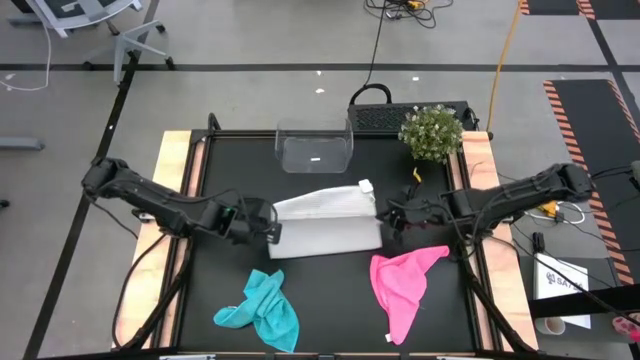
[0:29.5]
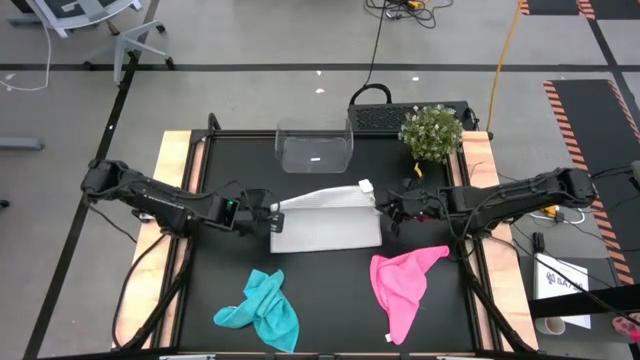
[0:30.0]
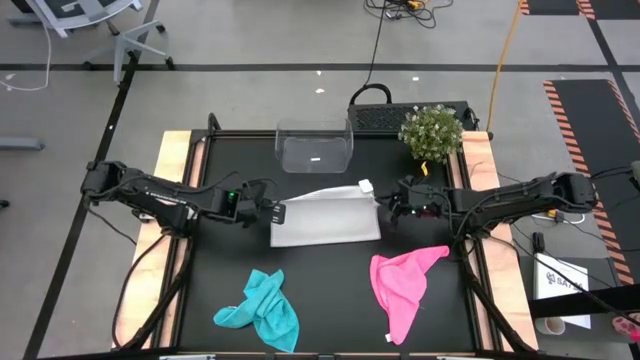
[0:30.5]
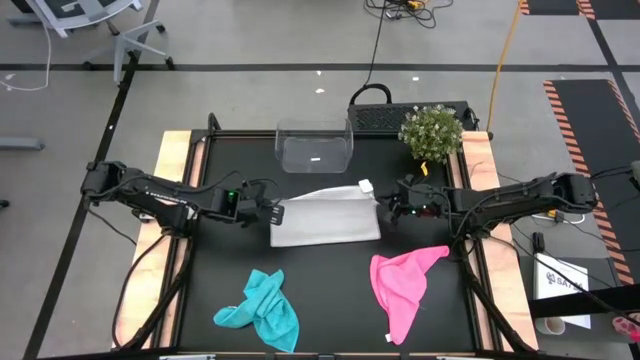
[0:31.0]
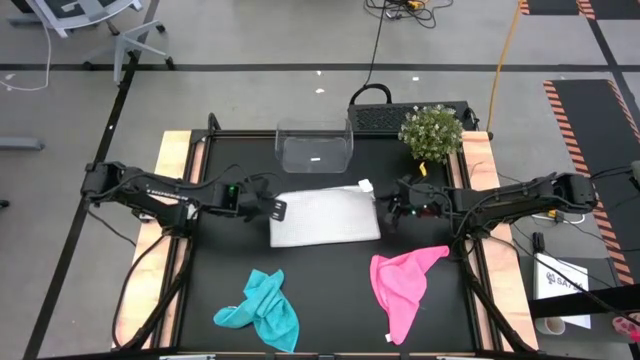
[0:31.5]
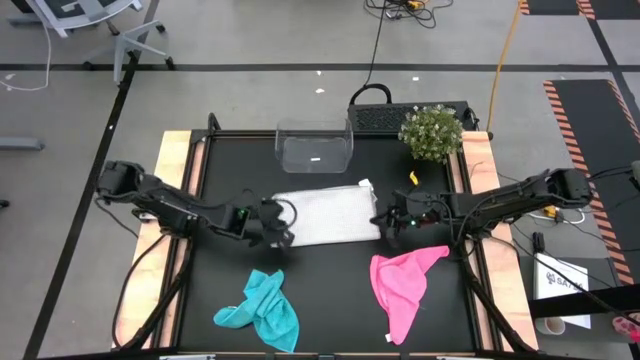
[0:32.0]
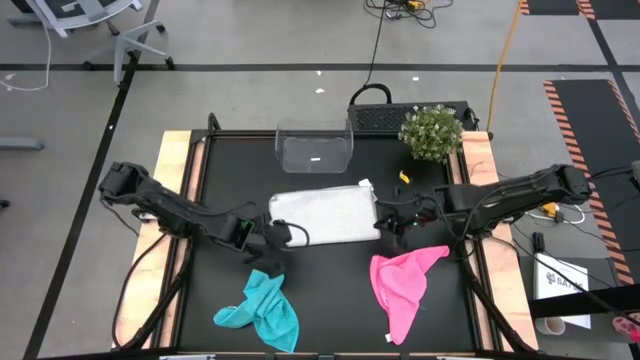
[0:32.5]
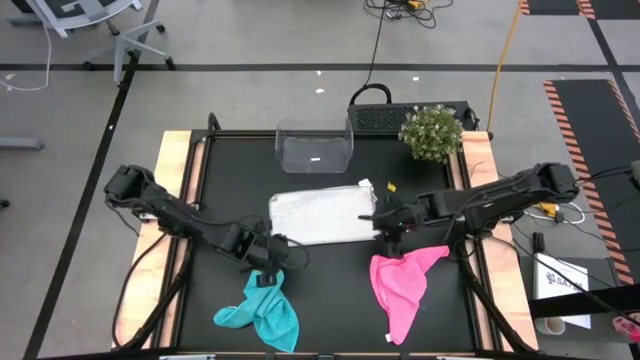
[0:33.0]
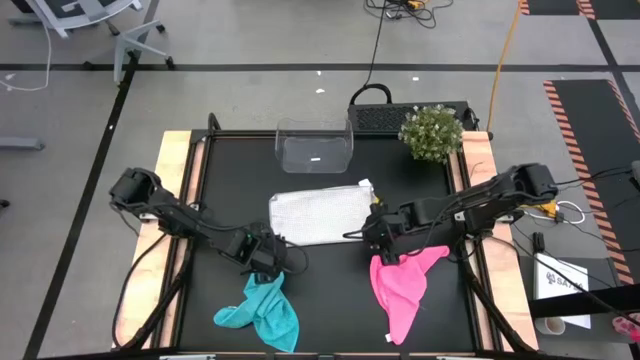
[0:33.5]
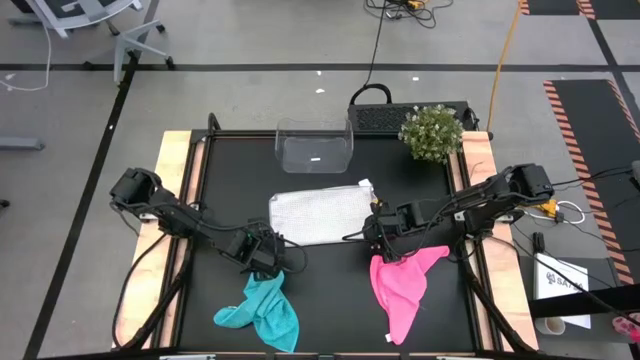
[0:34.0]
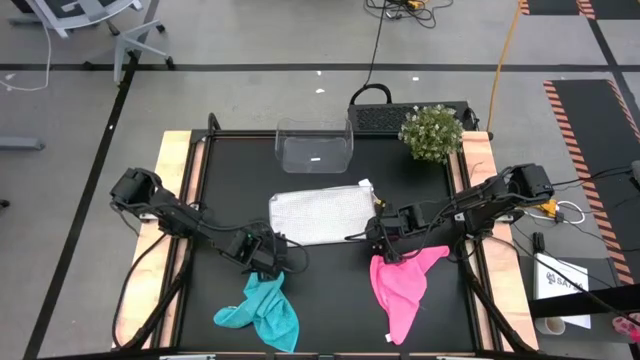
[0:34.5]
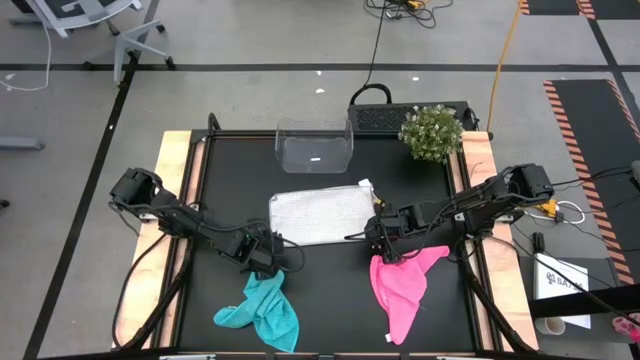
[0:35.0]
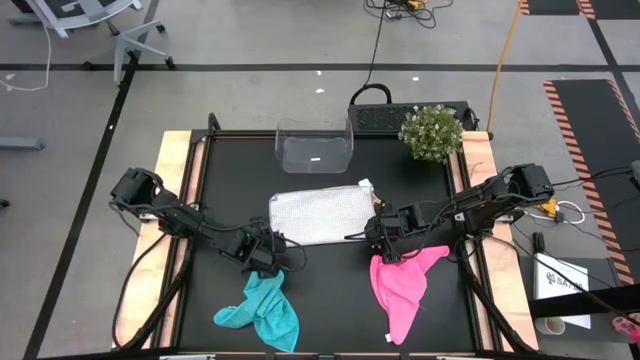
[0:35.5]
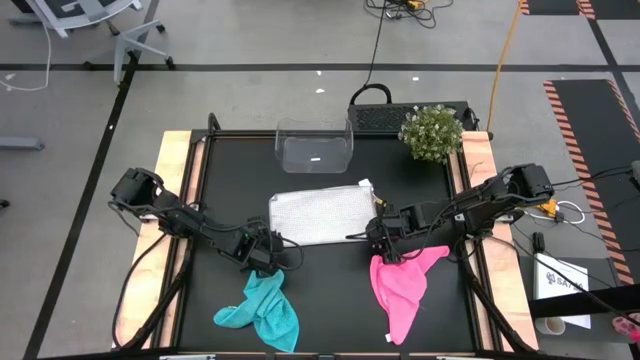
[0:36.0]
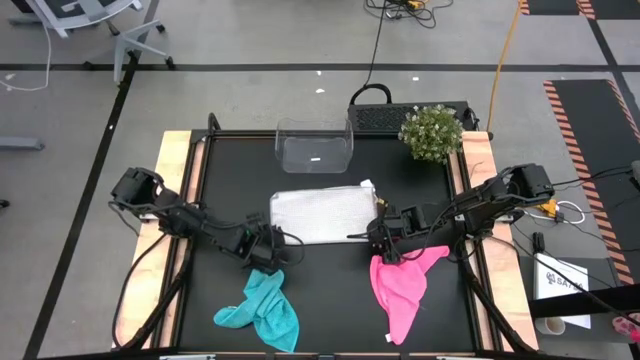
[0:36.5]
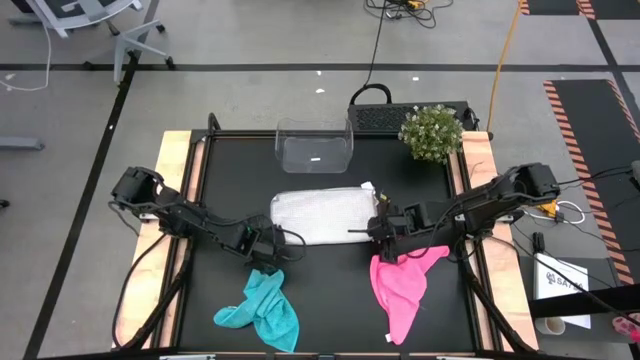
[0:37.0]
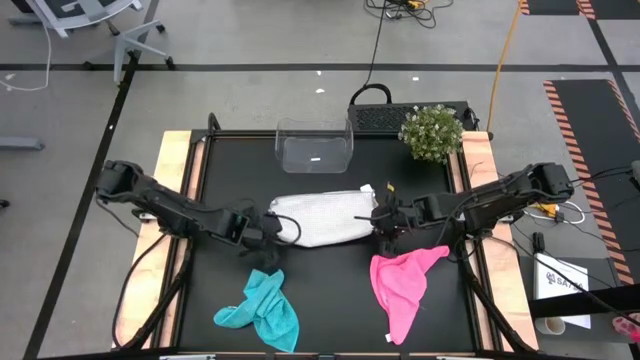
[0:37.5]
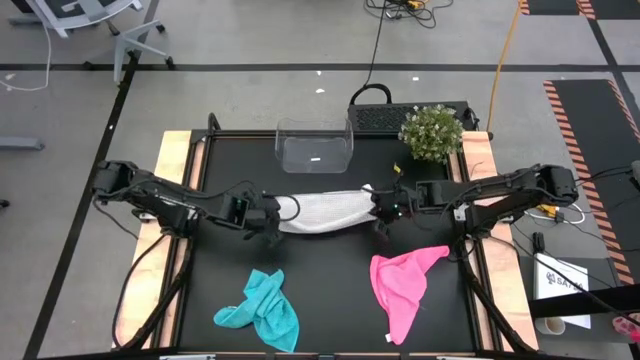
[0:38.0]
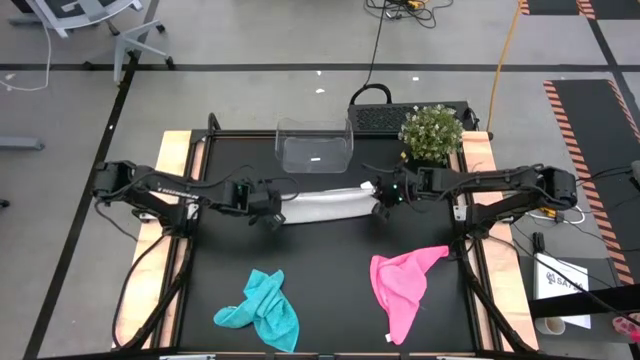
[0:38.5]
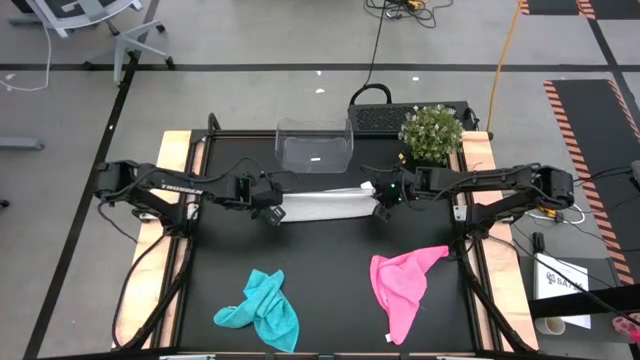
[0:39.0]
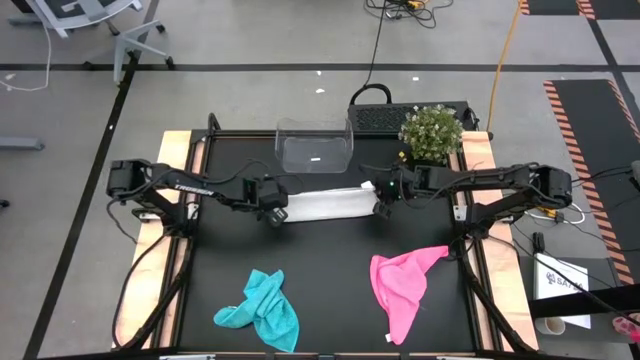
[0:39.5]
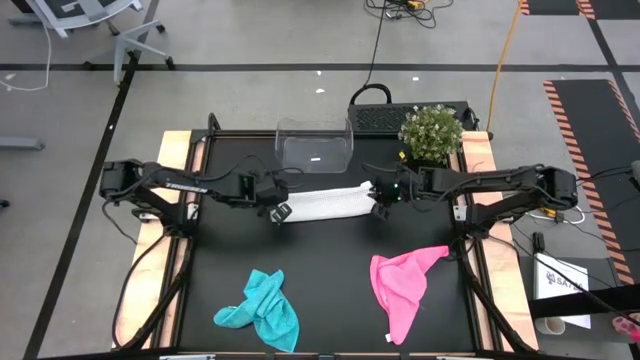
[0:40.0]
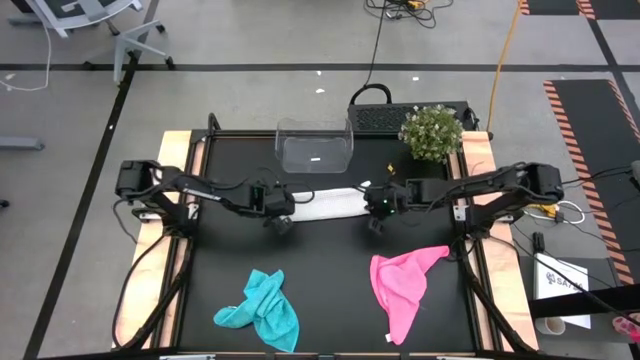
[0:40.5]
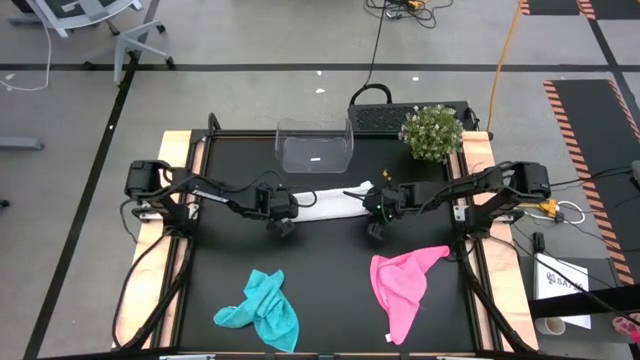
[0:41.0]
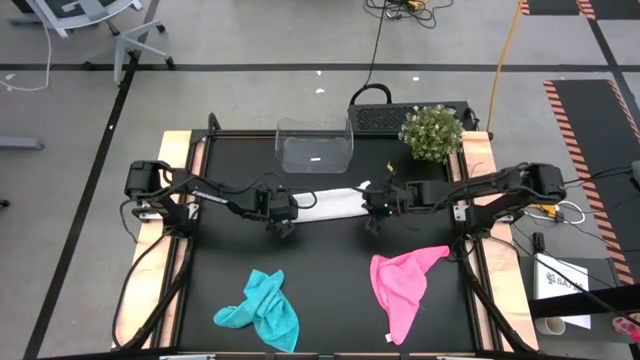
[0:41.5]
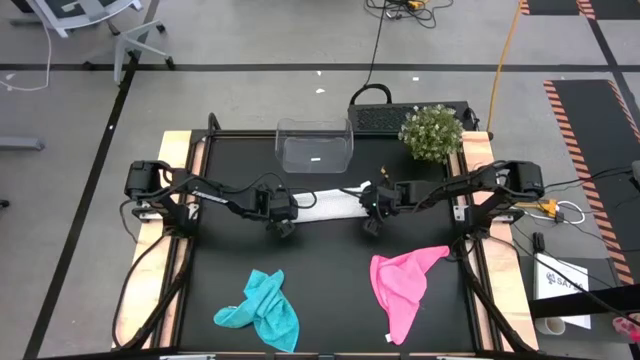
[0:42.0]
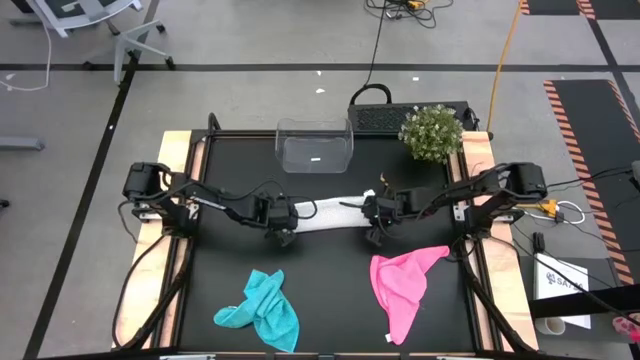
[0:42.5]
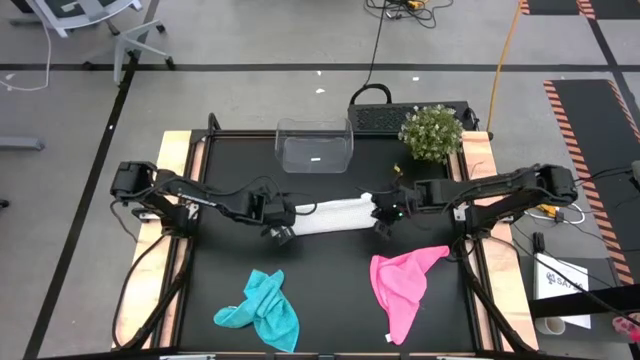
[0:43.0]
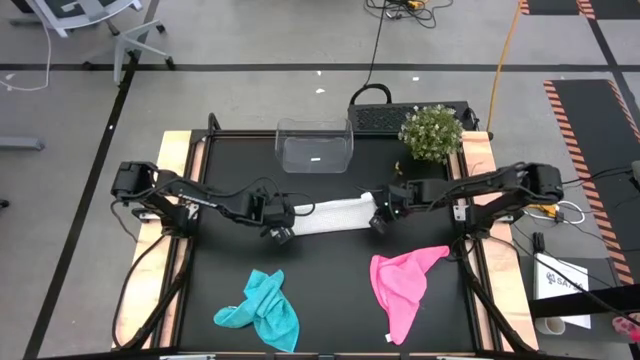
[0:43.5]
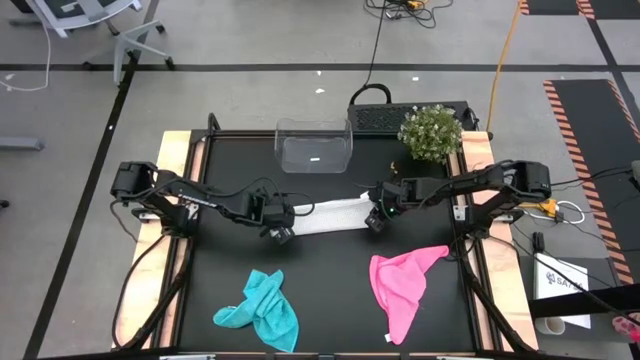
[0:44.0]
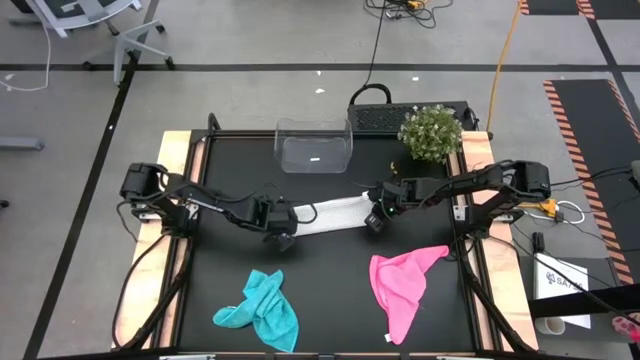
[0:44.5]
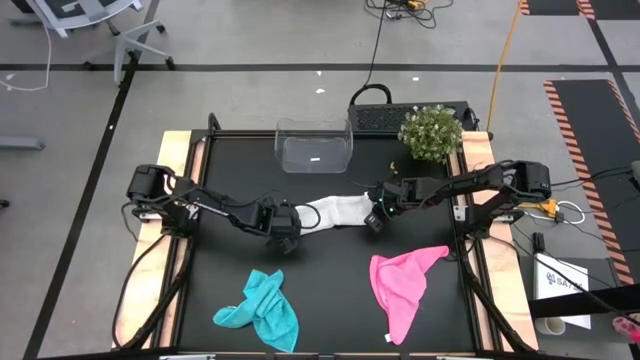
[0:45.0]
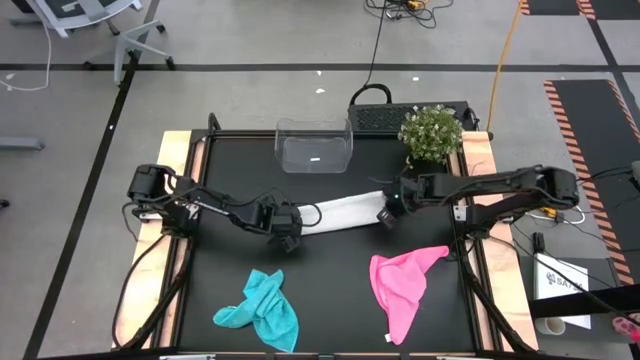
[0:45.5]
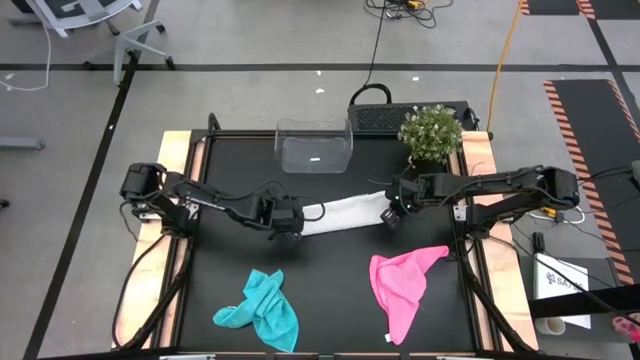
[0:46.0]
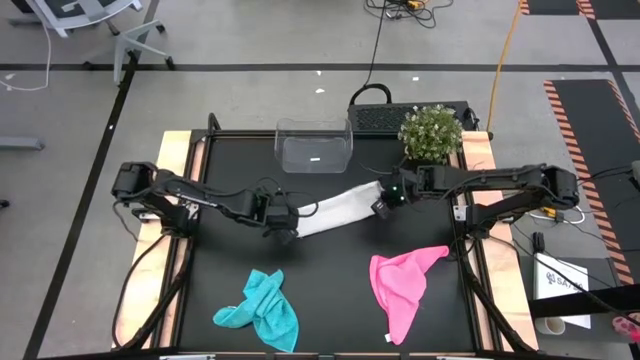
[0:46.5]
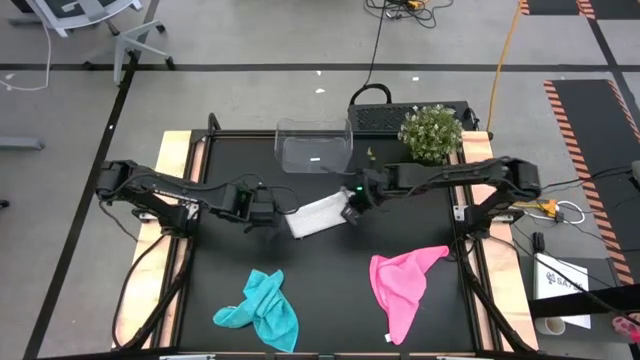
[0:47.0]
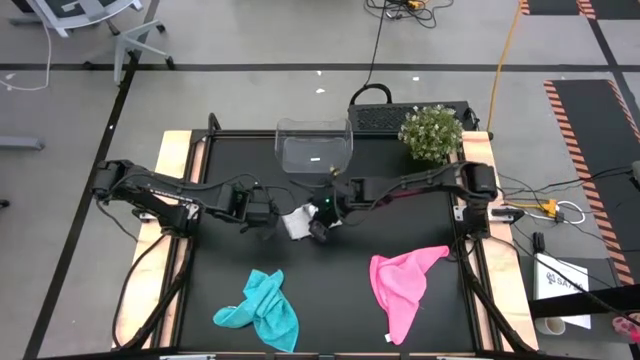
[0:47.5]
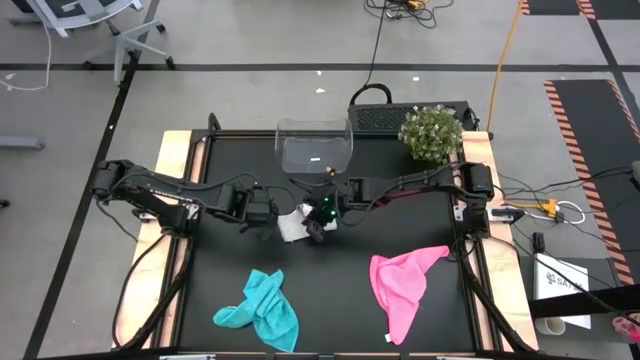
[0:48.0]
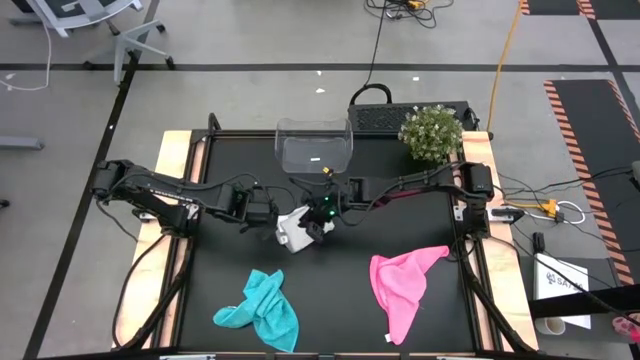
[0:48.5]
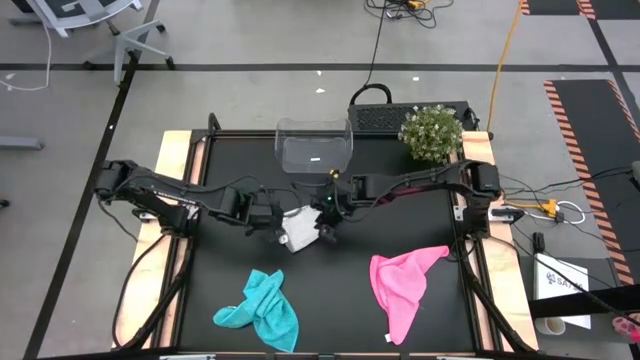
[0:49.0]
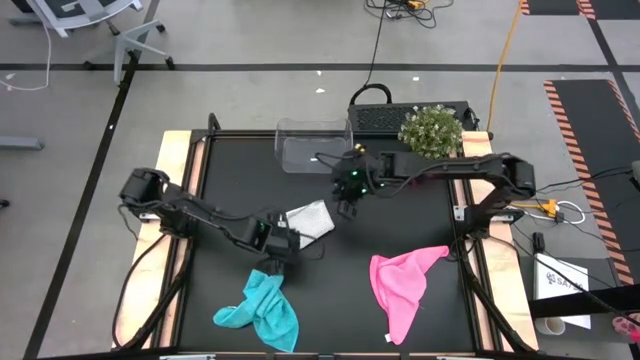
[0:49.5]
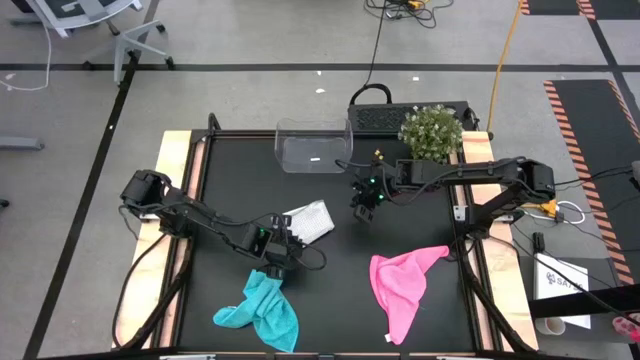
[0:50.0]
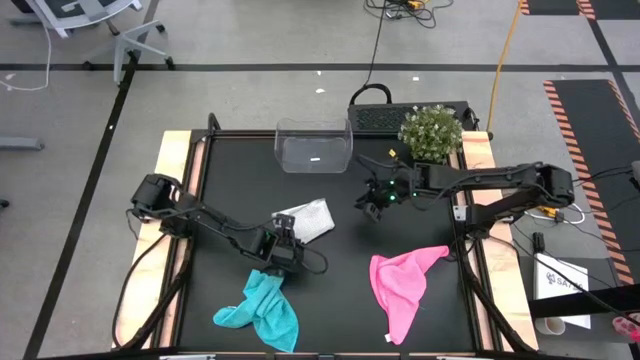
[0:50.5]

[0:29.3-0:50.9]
Task: Fold microfiber towels
Fold the gray microfiber cloth

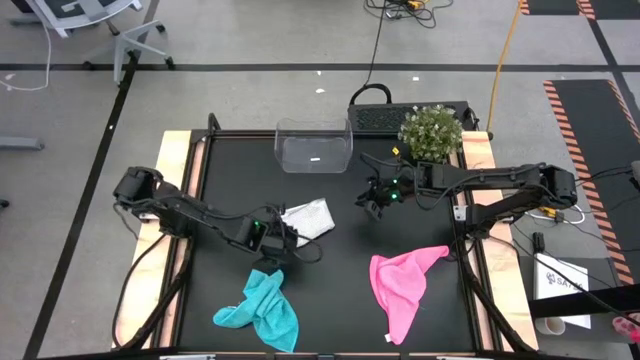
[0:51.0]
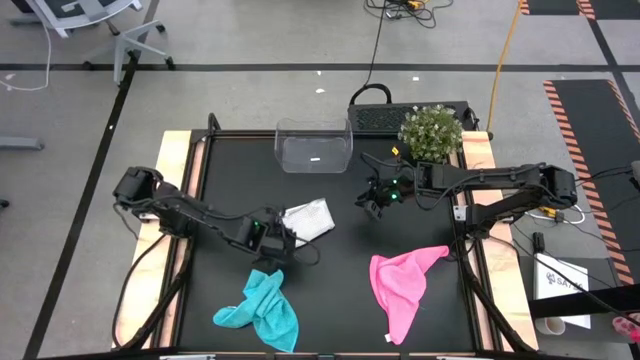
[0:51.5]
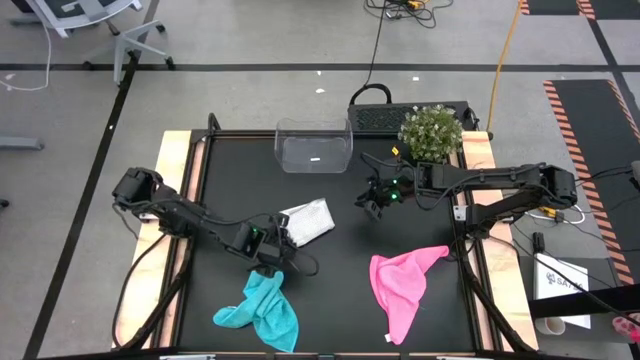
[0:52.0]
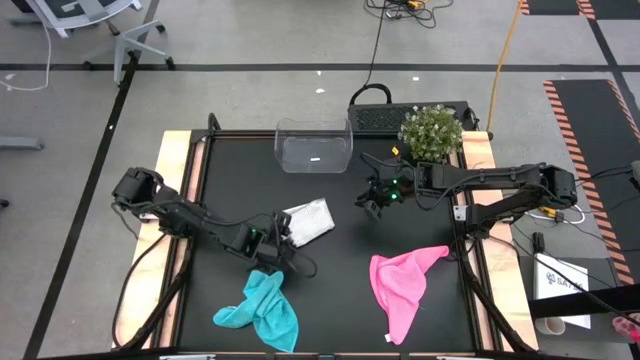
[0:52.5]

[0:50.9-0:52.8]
Fold the gray microfiber cloth
